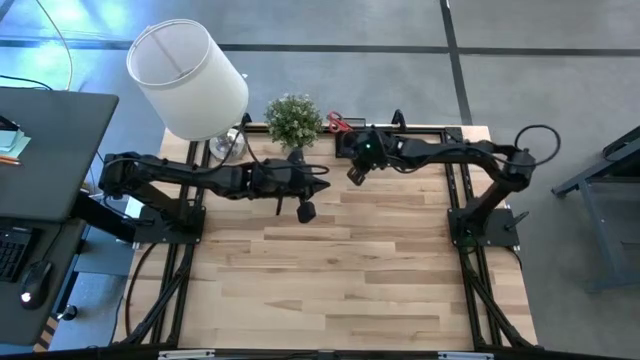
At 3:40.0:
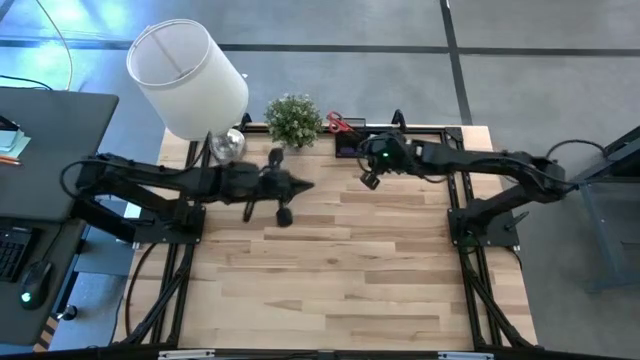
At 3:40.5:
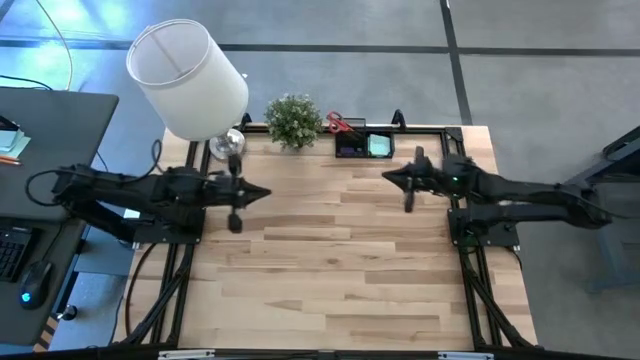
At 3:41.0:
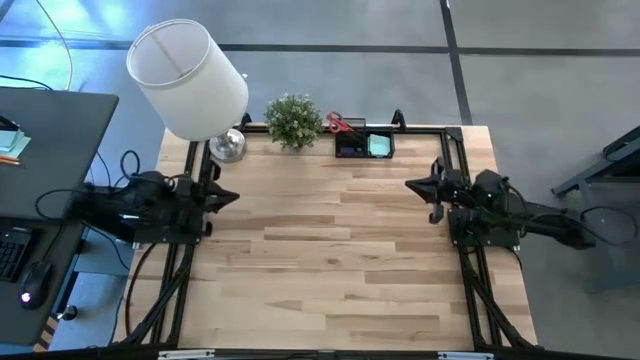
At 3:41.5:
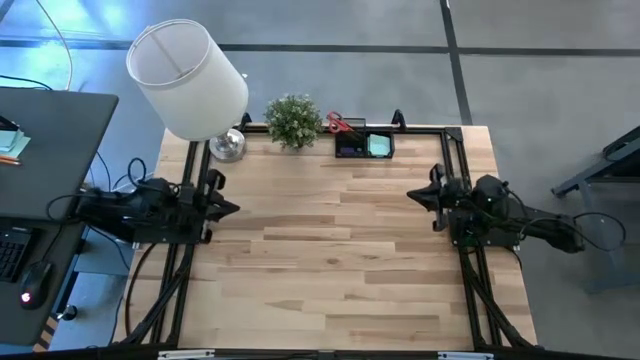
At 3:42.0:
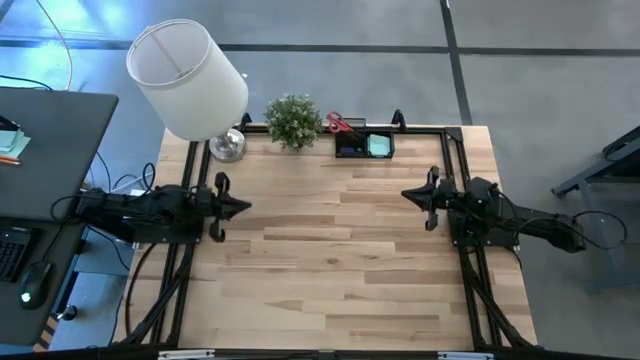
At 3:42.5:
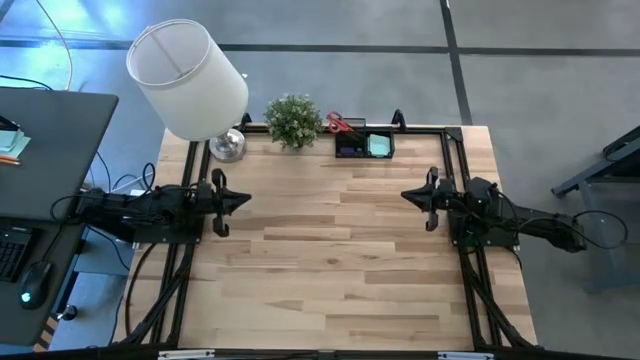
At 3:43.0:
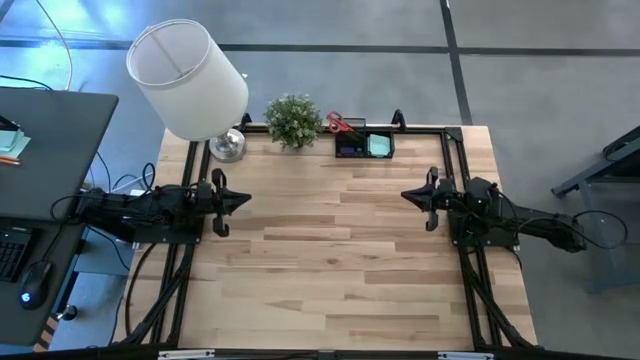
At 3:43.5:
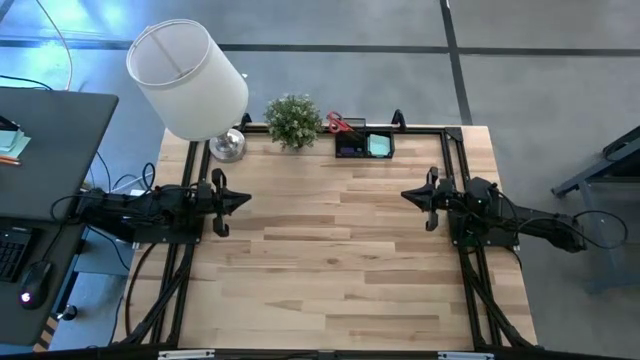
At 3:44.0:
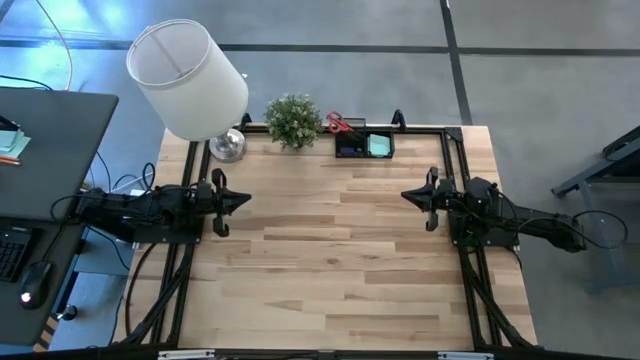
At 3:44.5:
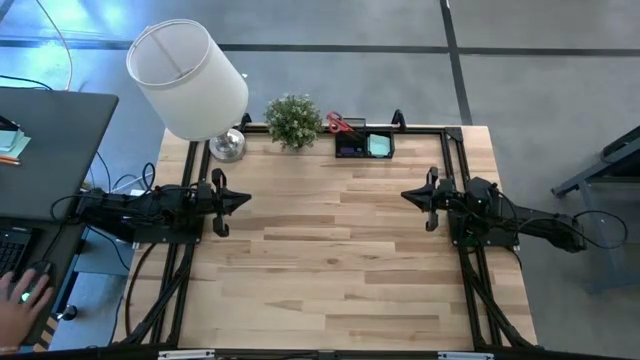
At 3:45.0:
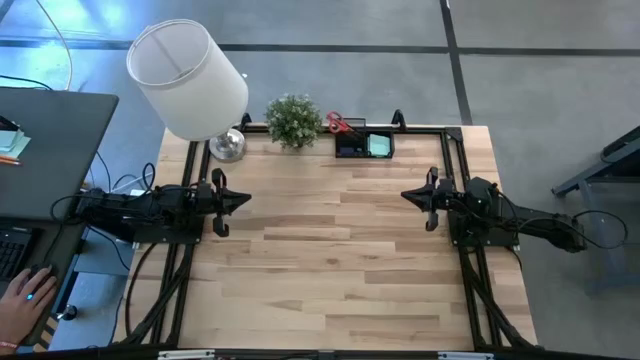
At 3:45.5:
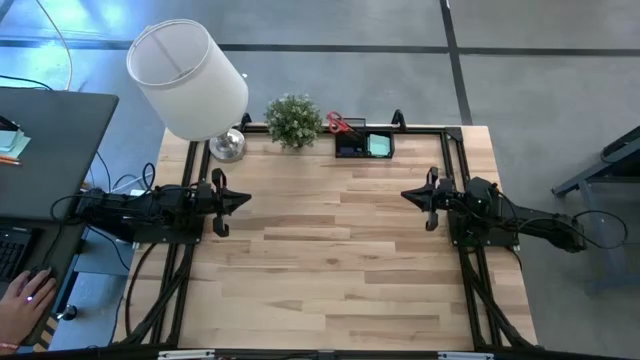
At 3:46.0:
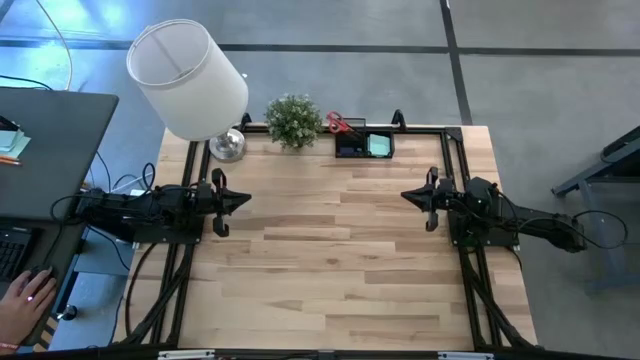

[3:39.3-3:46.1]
Task: Pick and place office supplies into organizer
Return to Home Position

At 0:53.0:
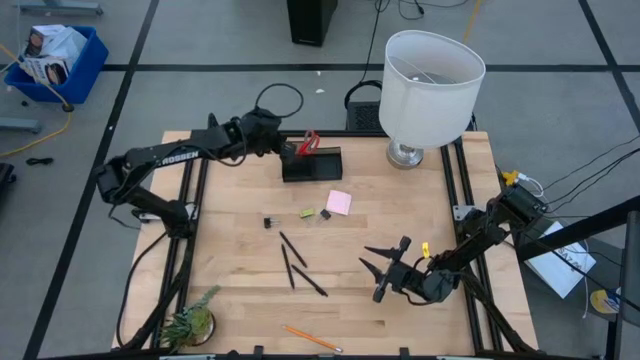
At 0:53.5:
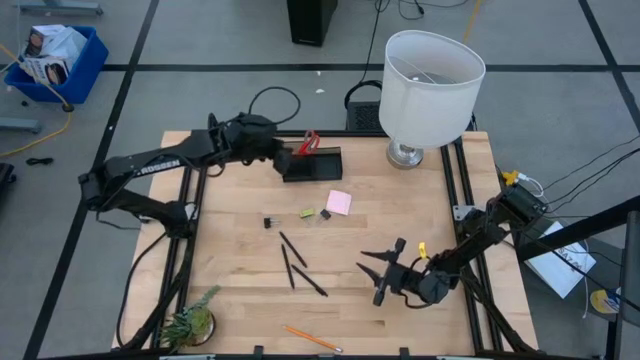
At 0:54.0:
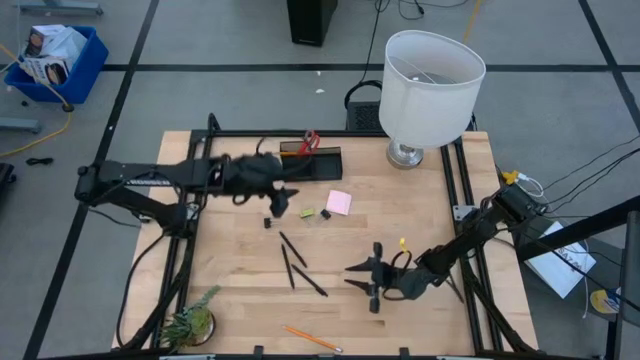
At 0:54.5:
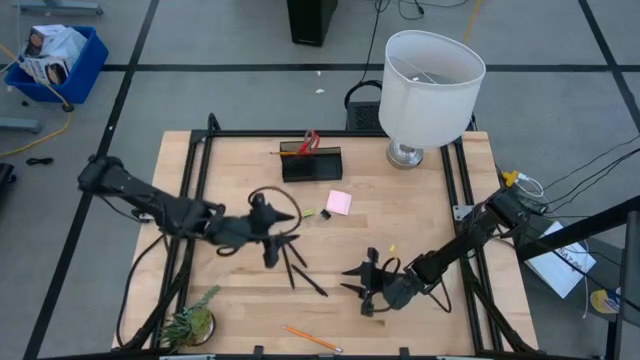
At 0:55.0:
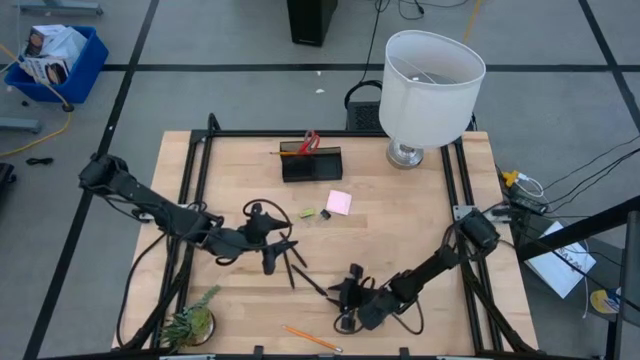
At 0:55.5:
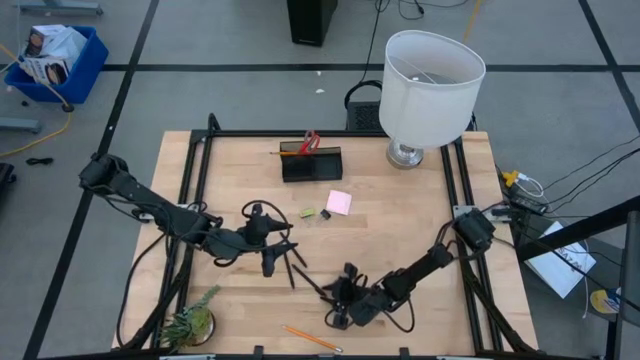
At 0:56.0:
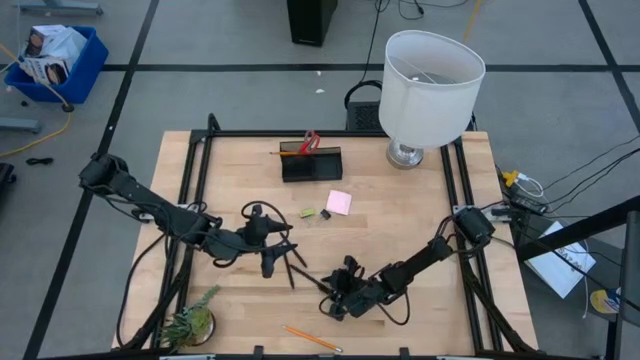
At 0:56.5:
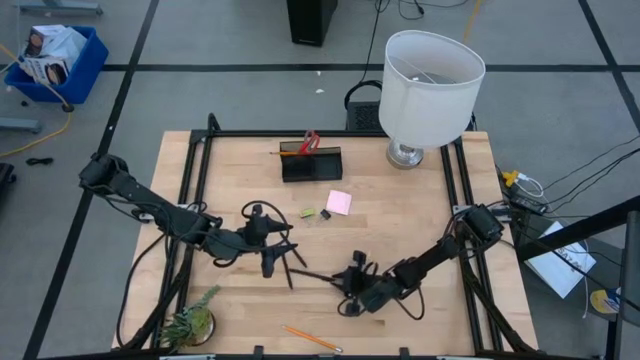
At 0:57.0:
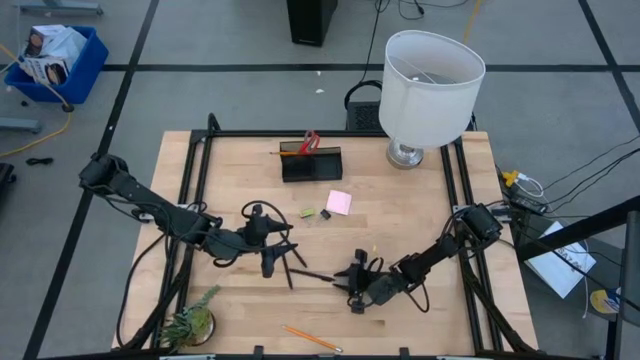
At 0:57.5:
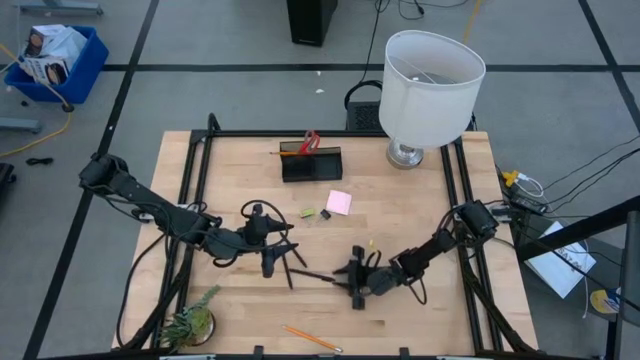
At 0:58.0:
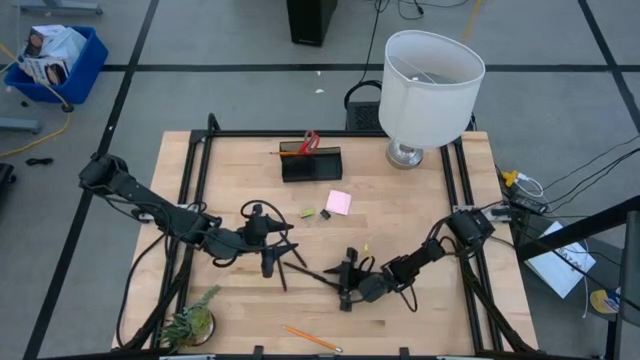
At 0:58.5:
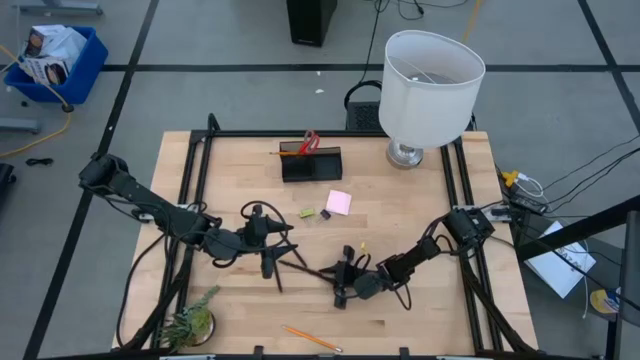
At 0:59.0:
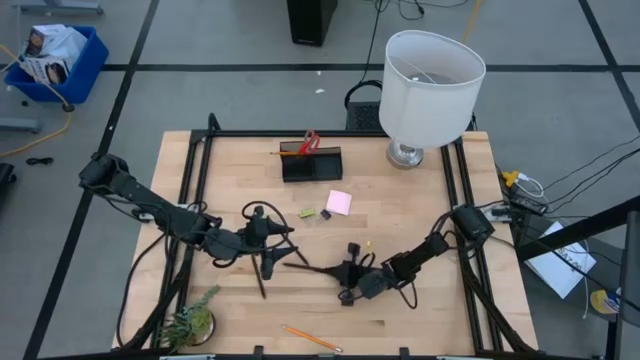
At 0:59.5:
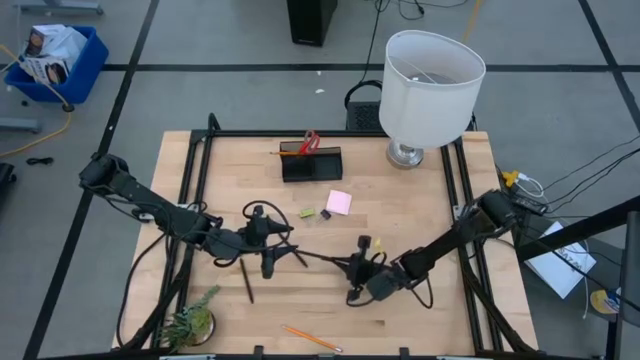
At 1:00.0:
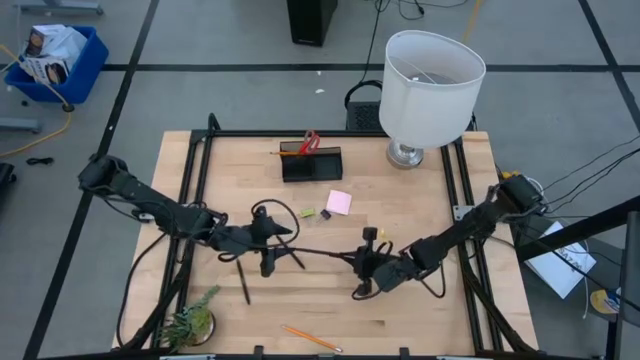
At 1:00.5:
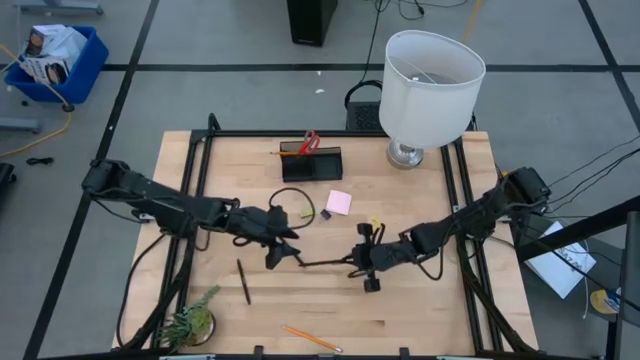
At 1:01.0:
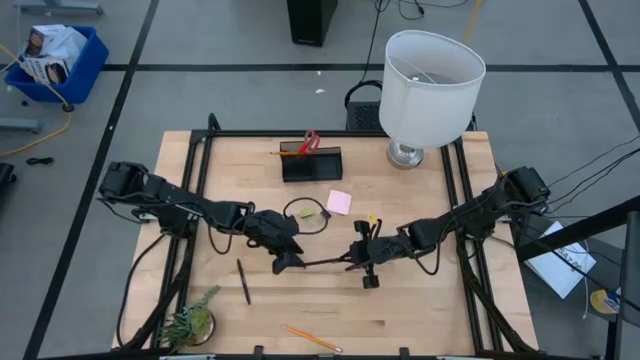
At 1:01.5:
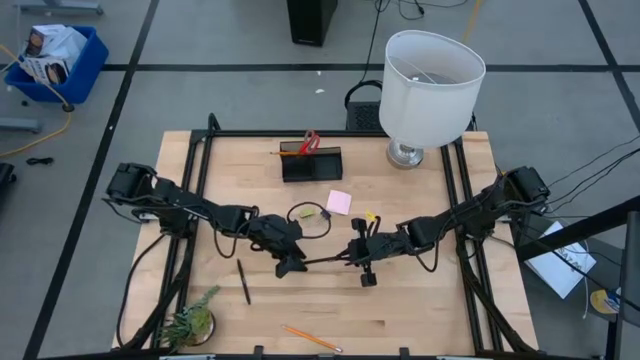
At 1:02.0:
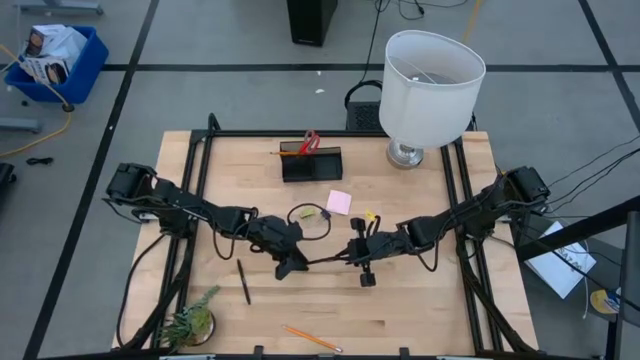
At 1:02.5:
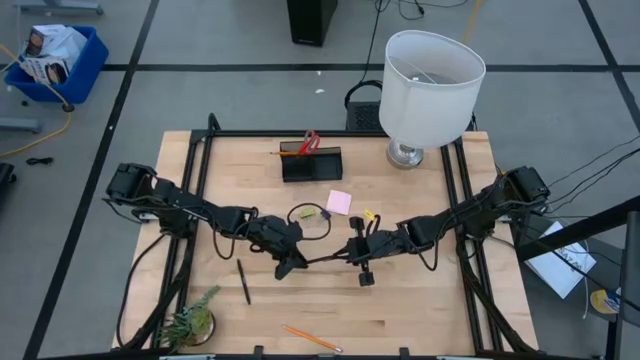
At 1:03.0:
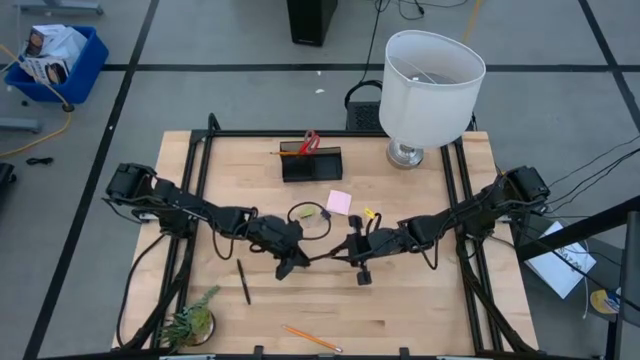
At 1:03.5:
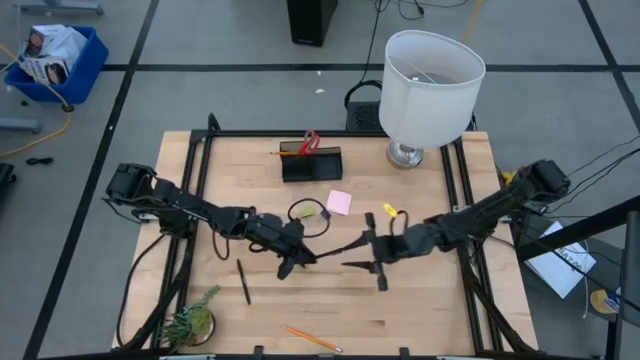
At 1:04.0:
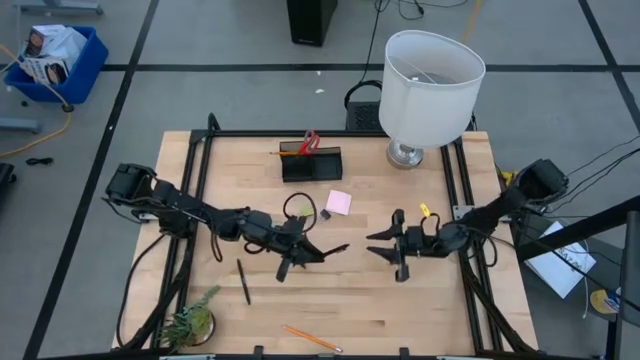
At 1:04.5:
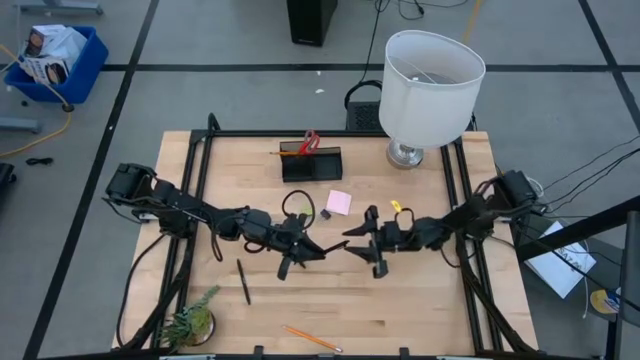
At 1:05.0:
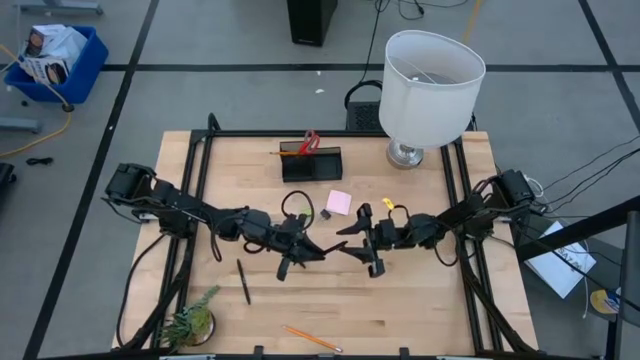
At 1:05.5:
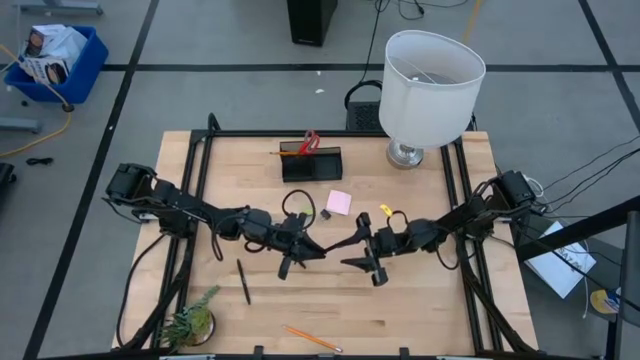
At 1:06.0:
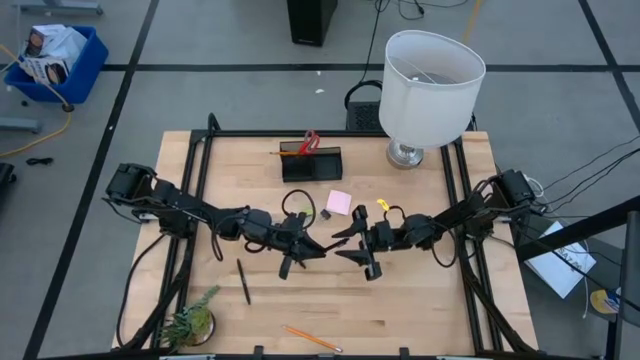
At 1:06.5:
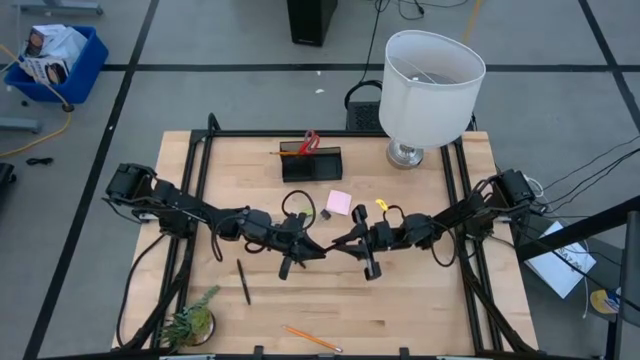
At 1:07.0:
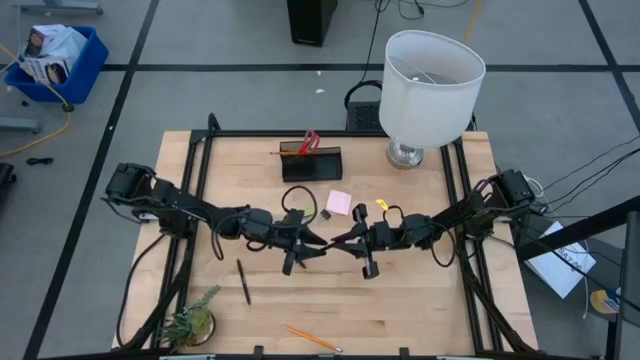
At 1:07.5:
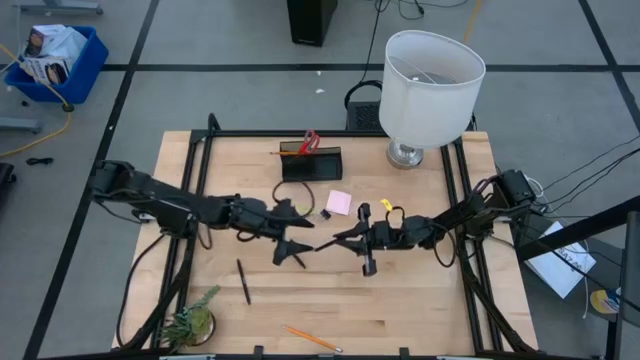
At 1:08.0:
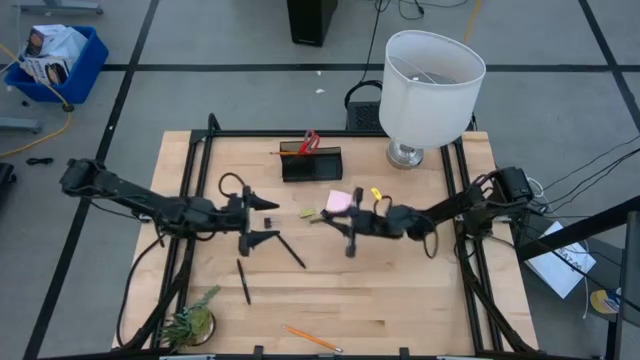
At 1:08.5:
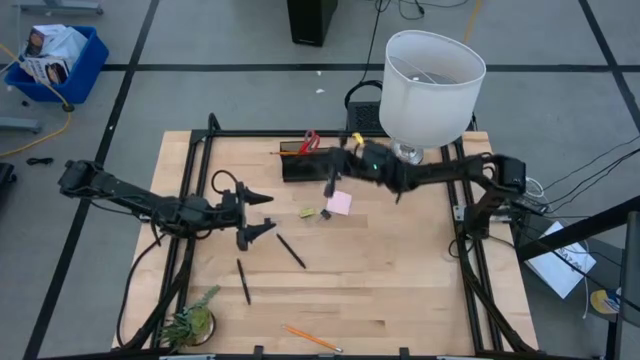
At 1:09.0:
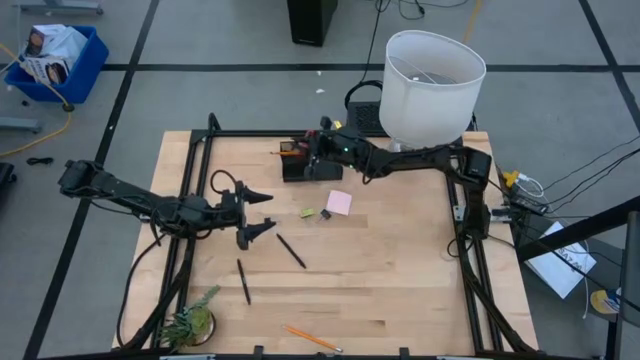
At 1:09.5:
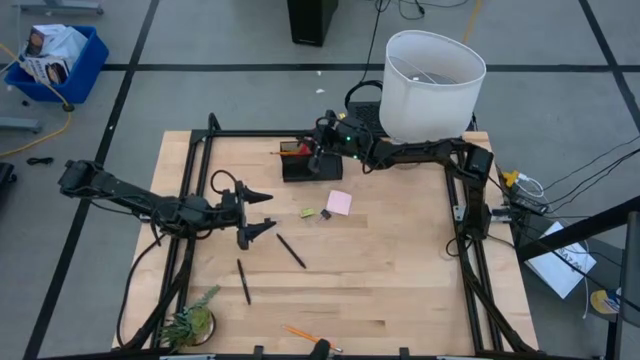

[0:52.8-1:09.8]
Task: Pick and place office supplies into organizer
Put the black pen into the black desk organizer
